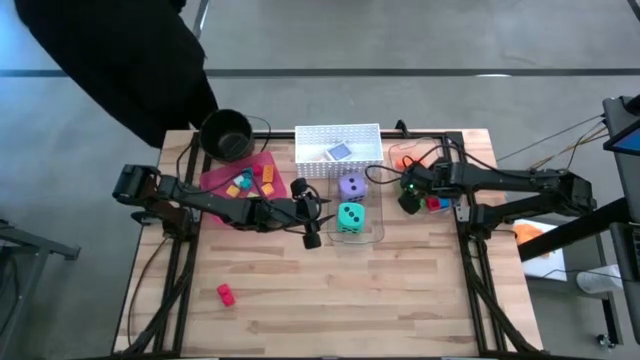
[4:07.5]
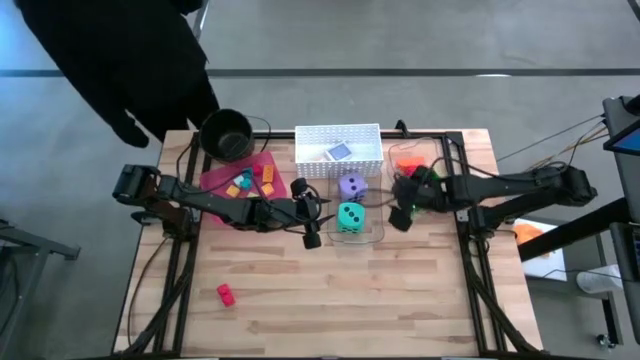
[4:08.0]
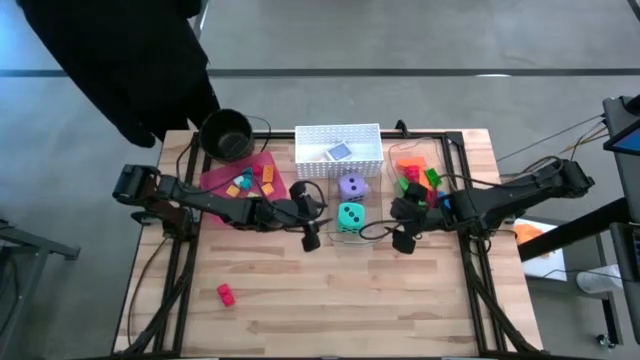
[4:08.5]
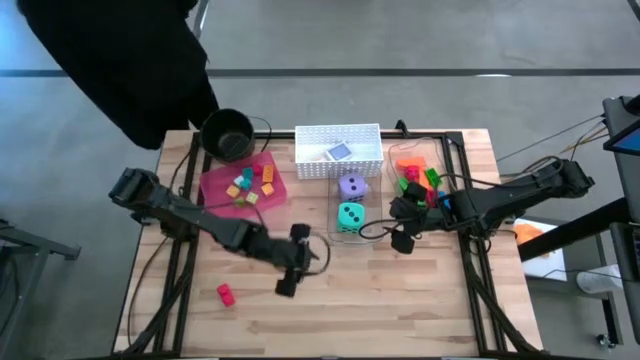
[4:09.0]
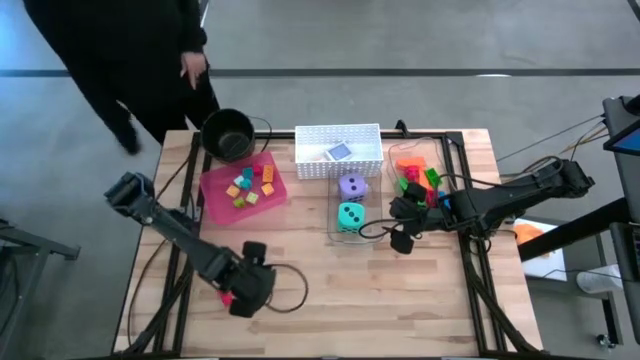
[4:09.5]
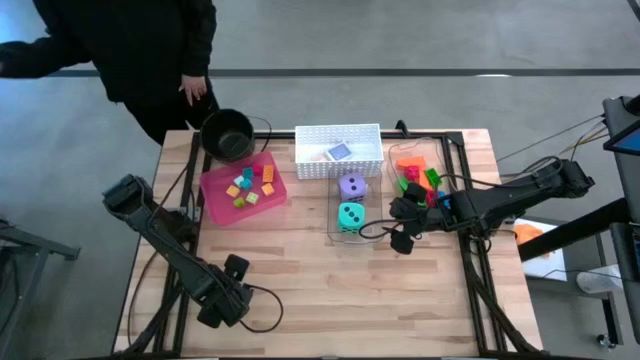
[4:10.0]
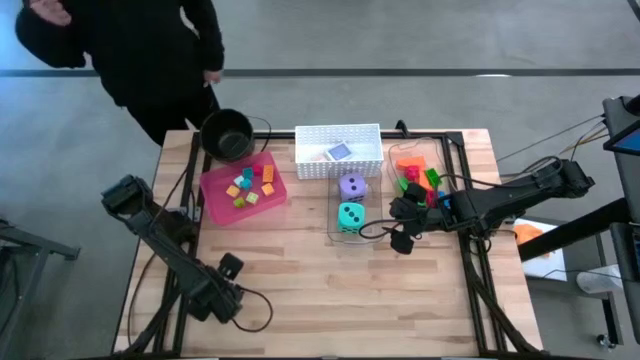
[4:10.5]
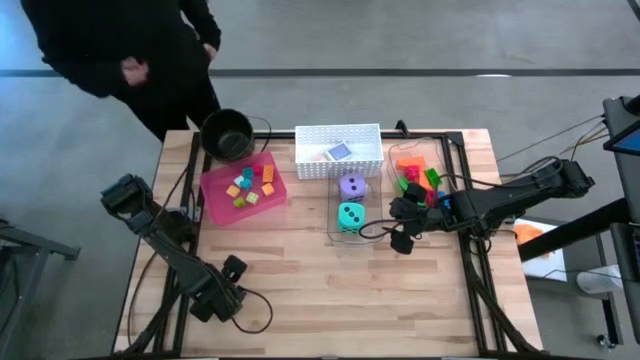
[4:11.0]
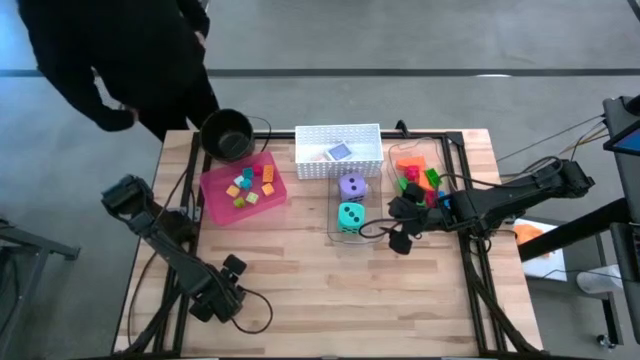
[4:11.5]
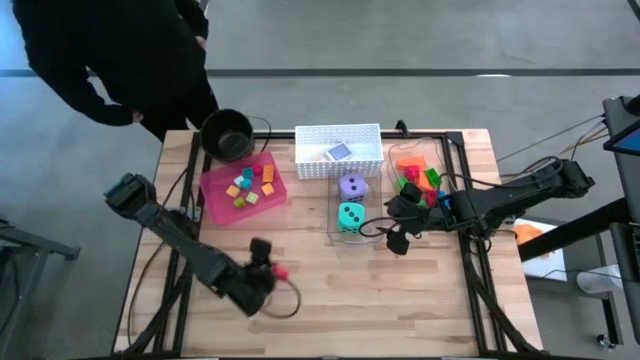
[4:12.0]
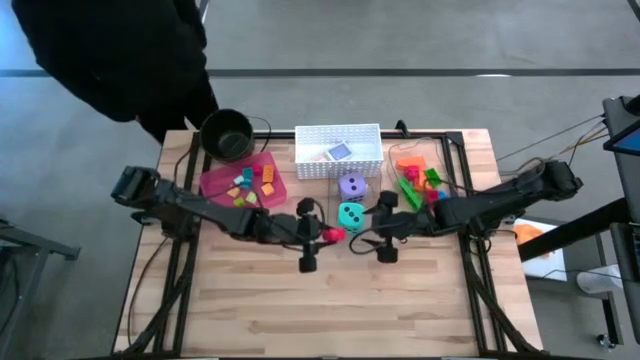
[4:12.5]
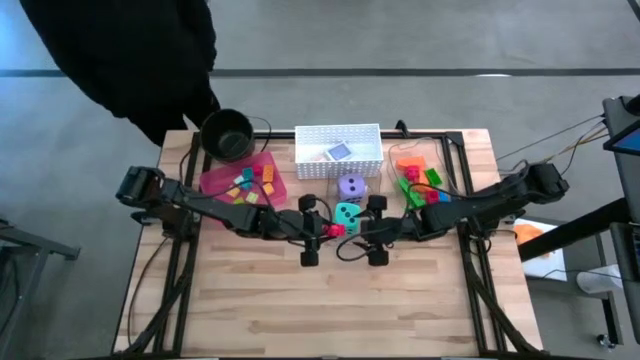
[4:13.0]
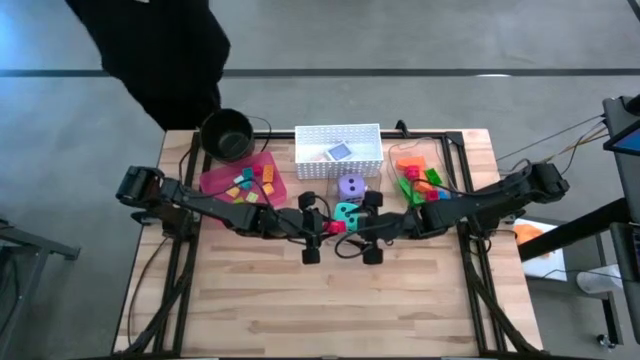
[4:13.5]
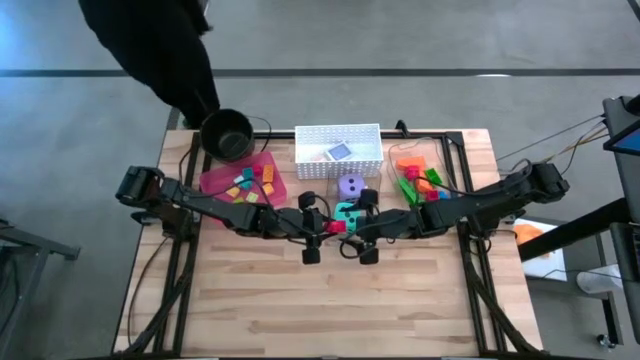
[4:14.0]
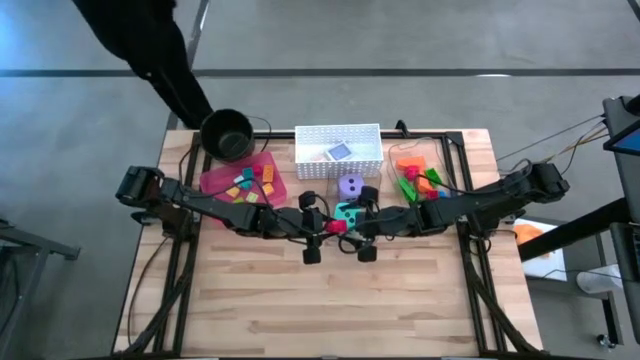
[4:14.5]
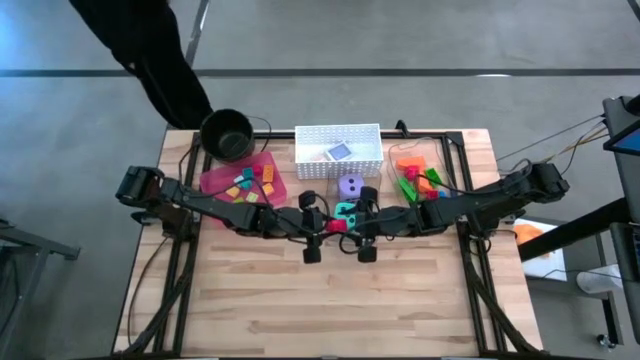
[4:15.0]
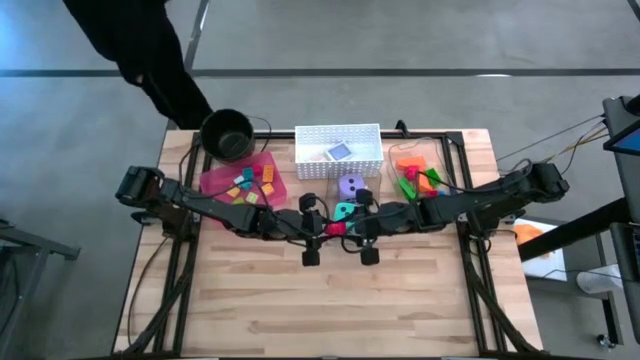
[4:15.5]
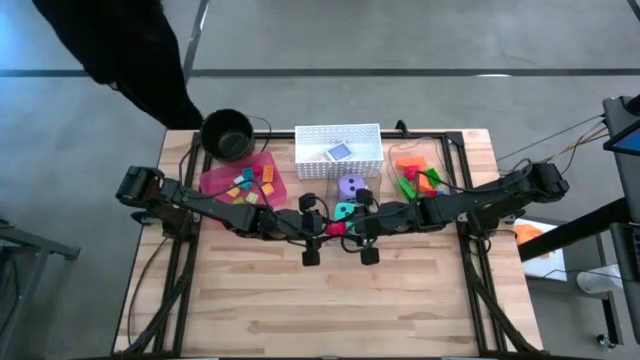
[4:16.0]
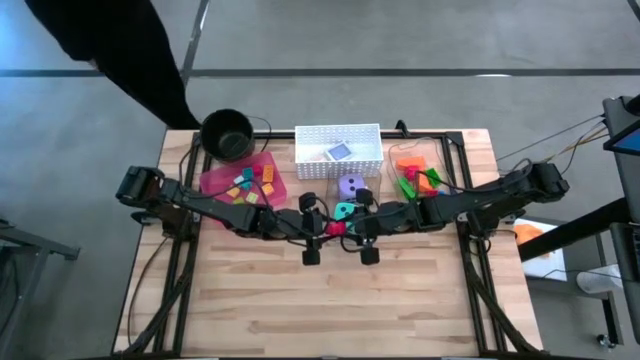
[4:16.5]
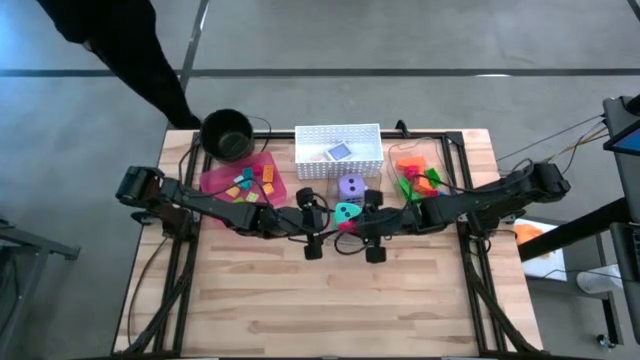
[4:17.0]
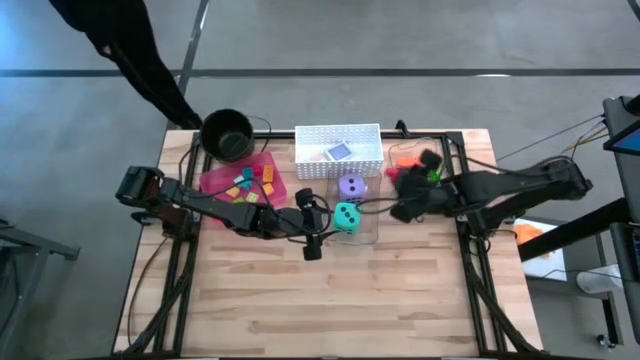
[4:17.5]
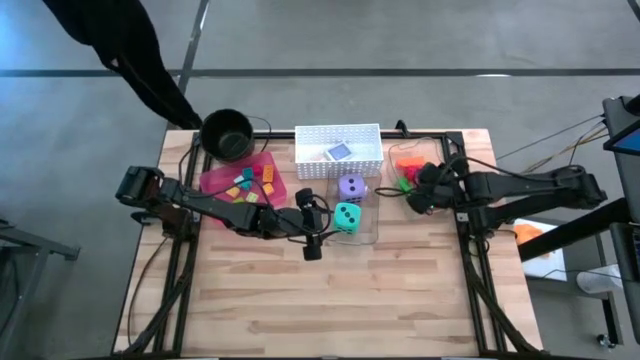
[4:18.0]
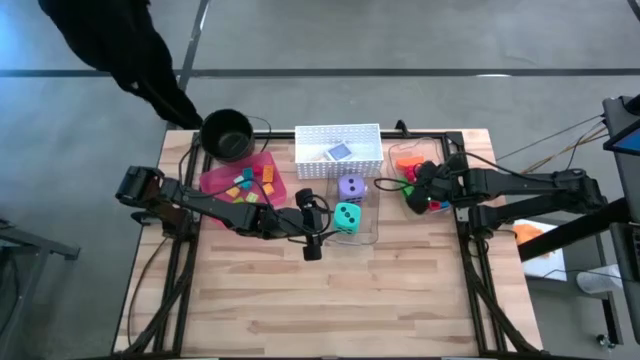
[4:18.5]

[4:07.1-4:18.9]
Task: Pick & Place Toys
Put the large red game piece into the top transparent bin

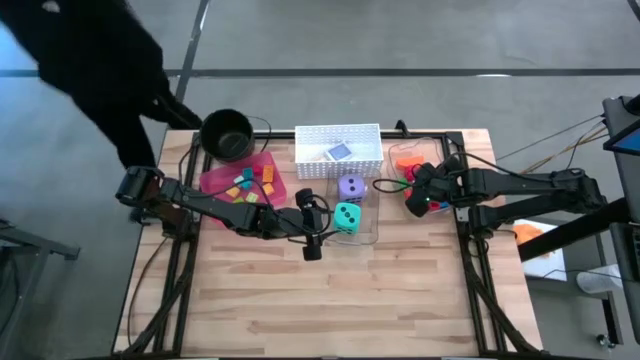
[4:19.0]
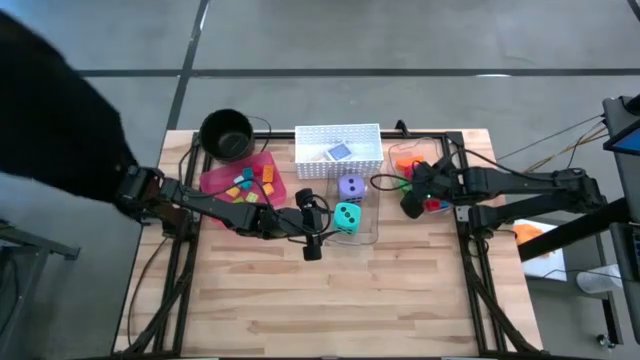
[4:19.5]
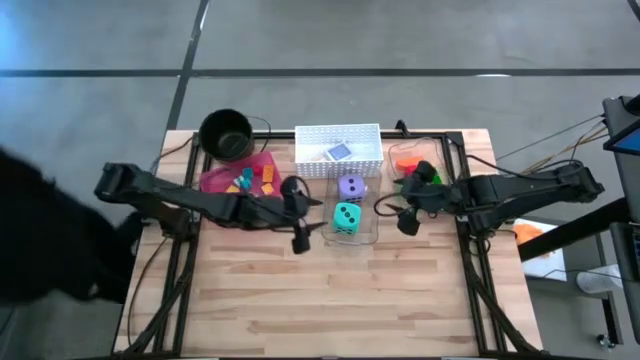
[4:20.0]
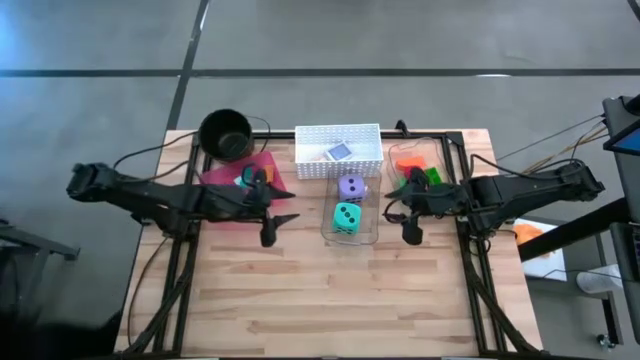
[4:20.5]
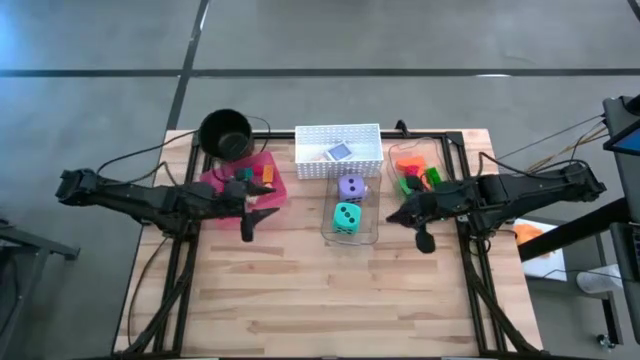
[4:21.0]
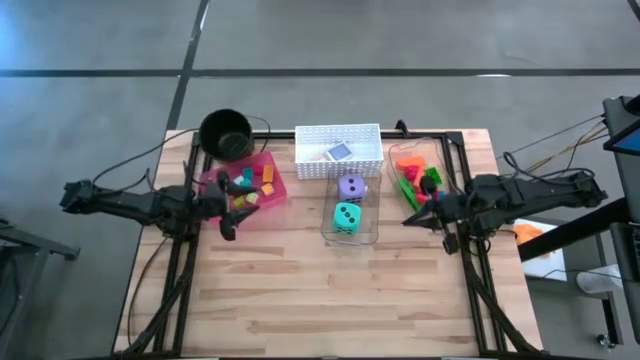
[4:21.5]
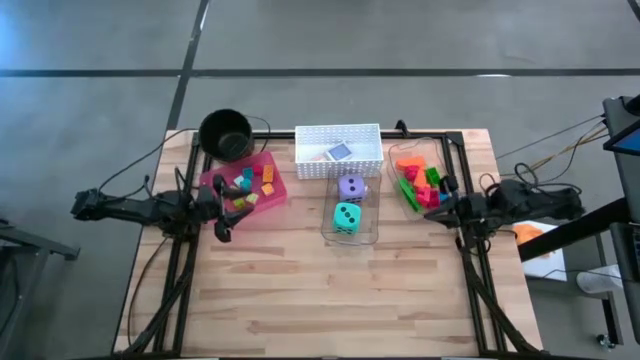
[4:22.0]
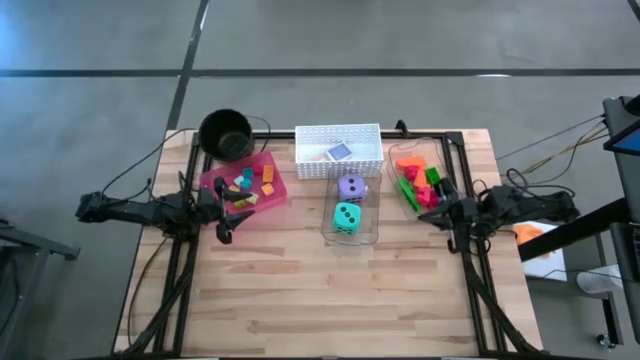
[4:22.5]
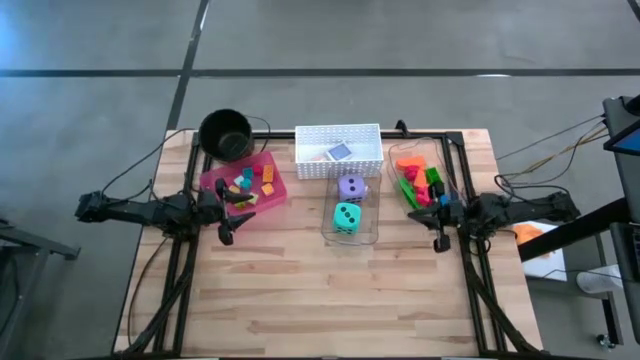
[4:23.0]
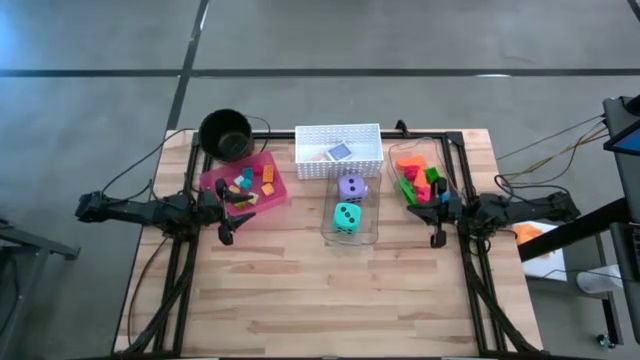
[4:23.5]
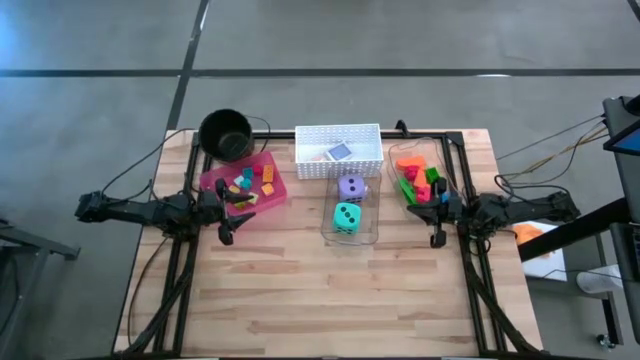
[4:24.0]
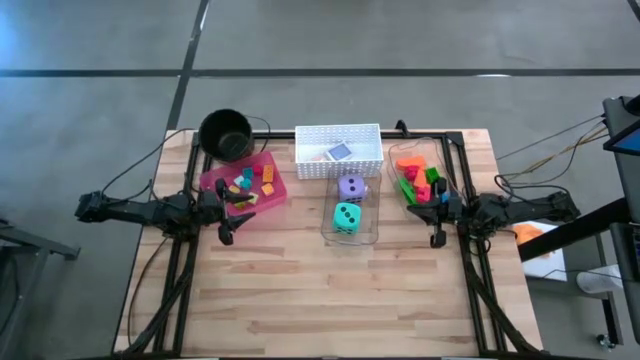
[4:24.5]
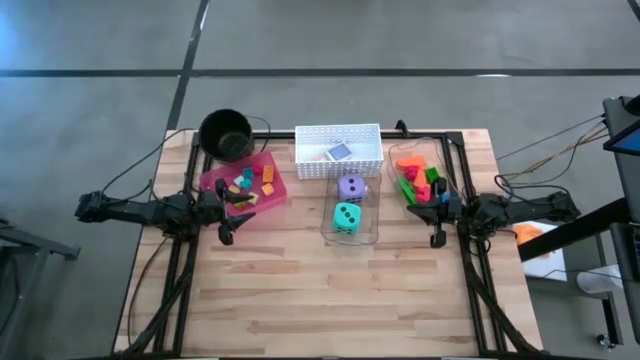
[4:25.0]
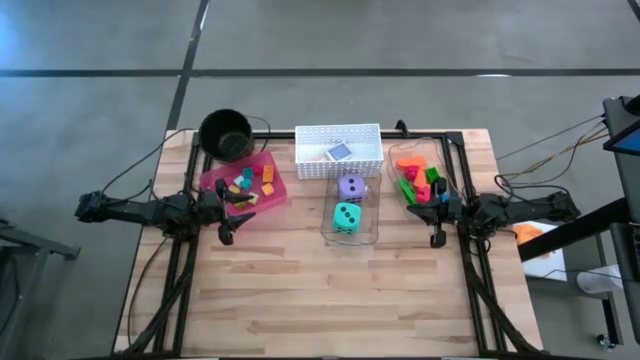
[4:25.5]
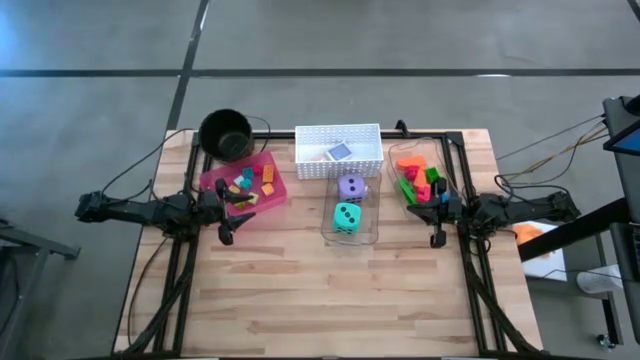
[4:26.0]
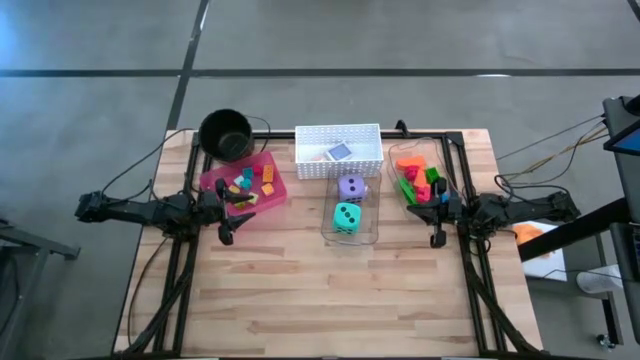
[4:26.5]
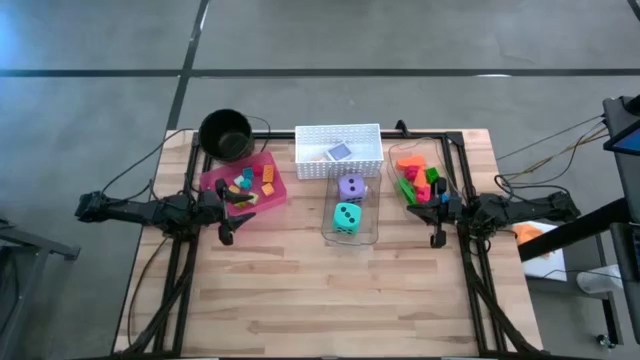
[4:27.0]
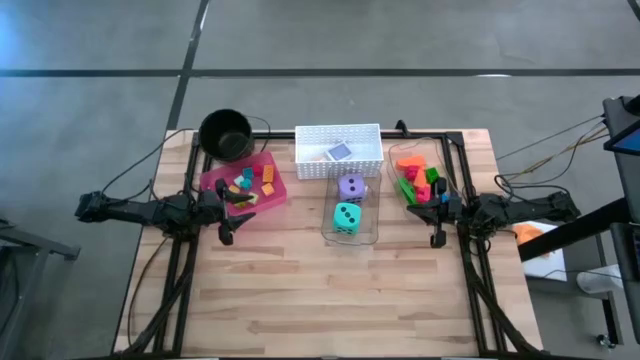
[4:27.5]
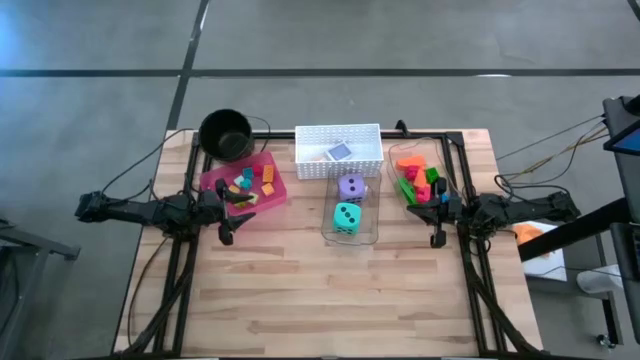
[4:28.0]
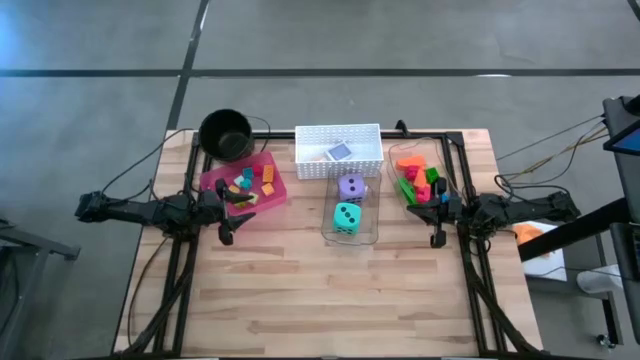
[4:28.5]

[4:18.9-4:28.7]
Return to Home Position
